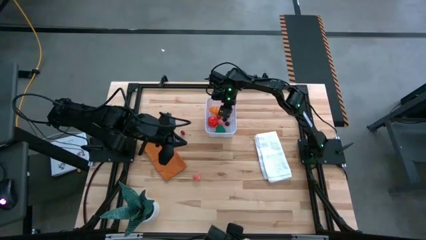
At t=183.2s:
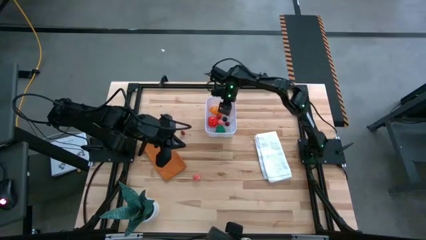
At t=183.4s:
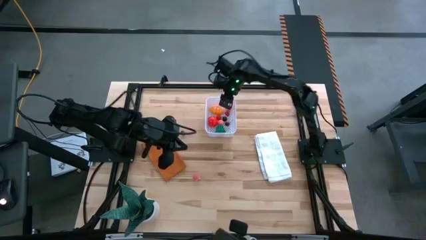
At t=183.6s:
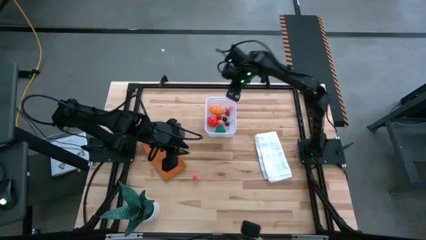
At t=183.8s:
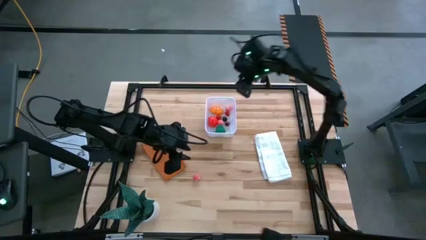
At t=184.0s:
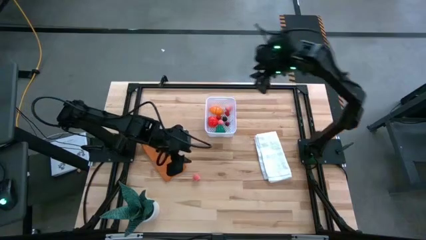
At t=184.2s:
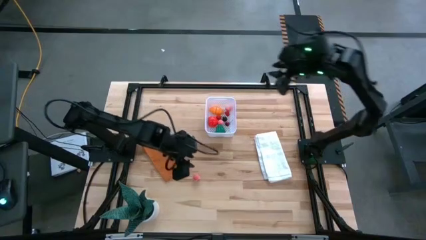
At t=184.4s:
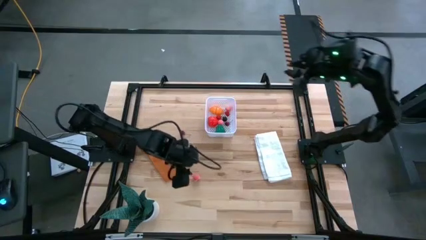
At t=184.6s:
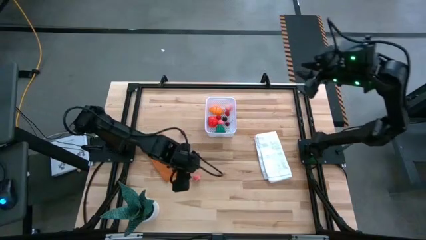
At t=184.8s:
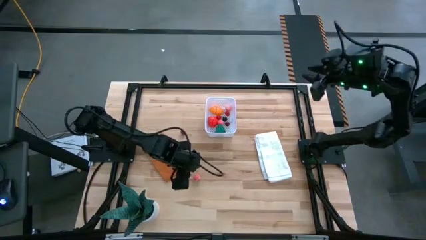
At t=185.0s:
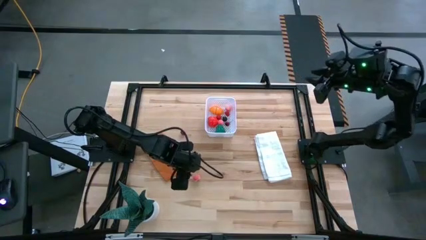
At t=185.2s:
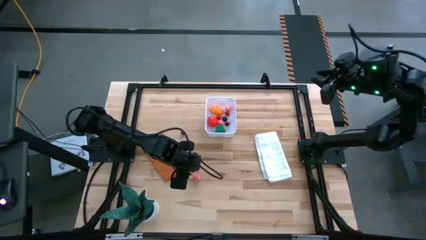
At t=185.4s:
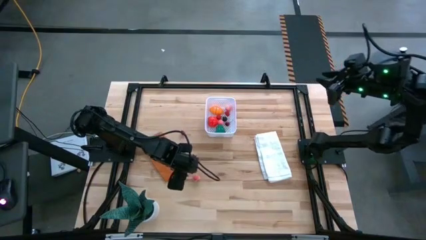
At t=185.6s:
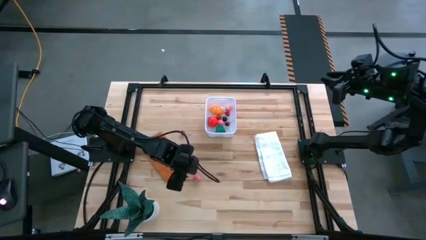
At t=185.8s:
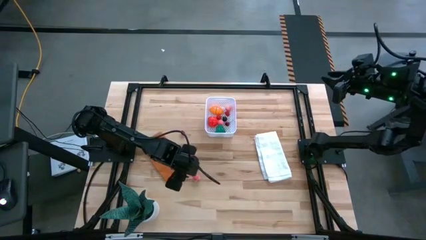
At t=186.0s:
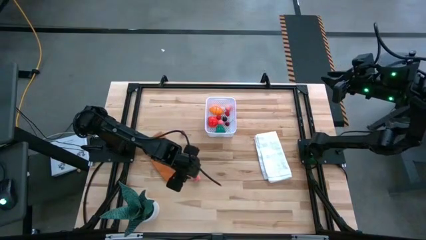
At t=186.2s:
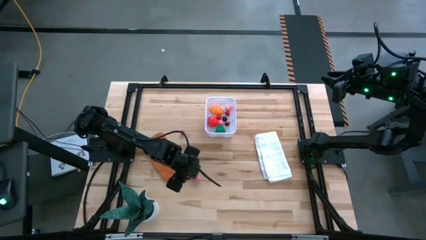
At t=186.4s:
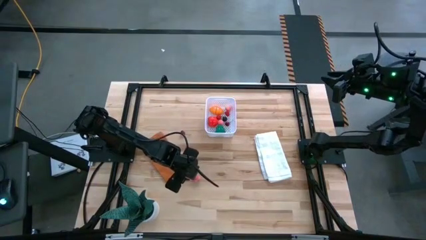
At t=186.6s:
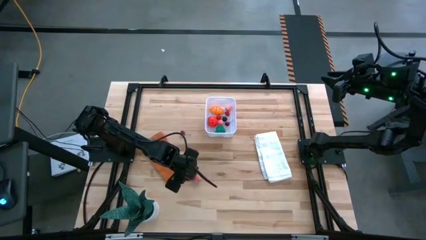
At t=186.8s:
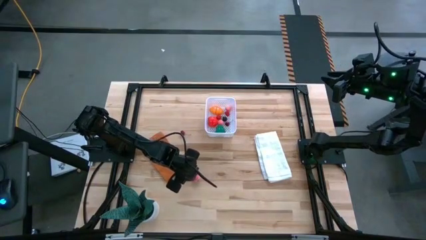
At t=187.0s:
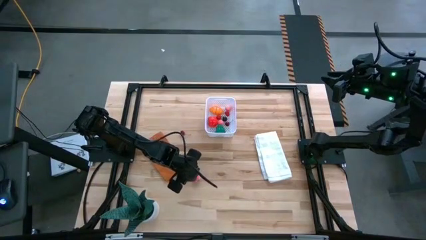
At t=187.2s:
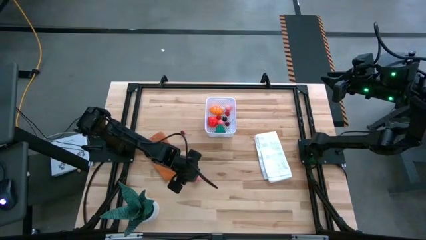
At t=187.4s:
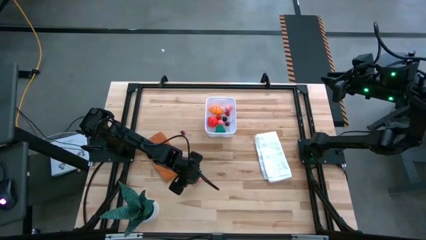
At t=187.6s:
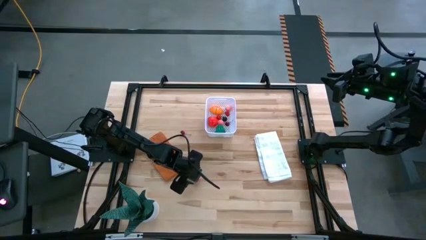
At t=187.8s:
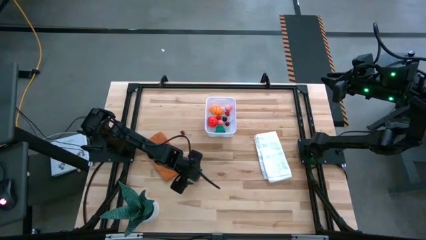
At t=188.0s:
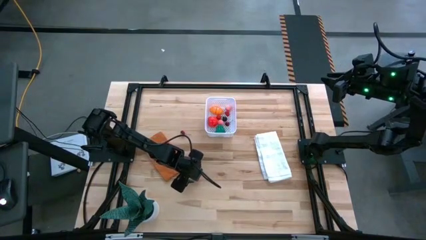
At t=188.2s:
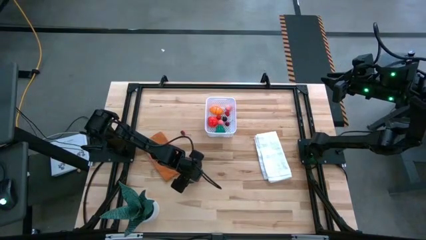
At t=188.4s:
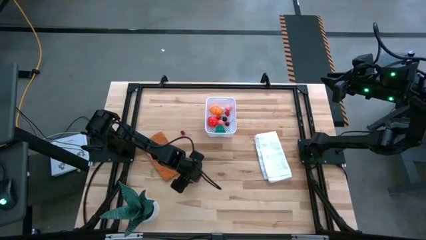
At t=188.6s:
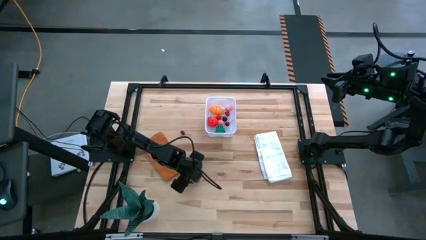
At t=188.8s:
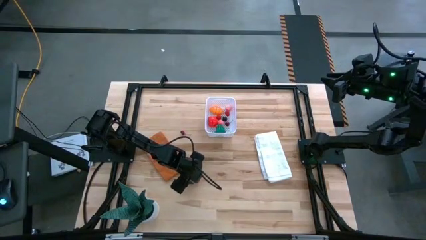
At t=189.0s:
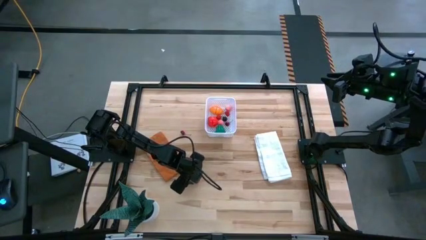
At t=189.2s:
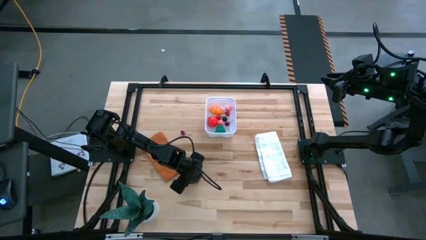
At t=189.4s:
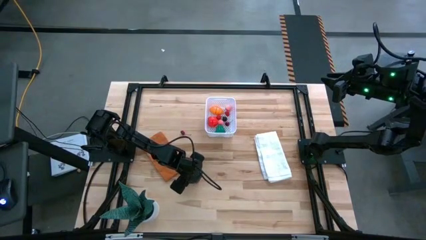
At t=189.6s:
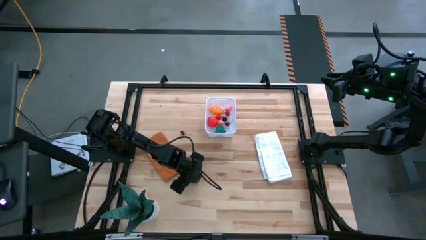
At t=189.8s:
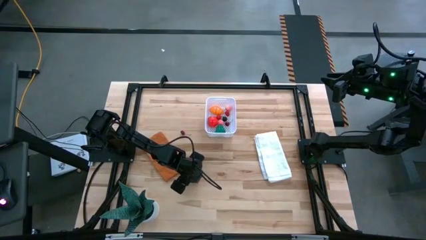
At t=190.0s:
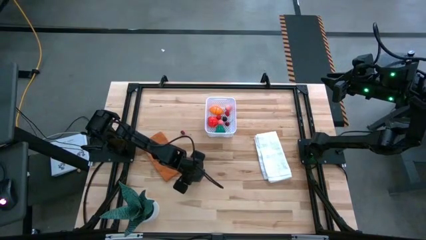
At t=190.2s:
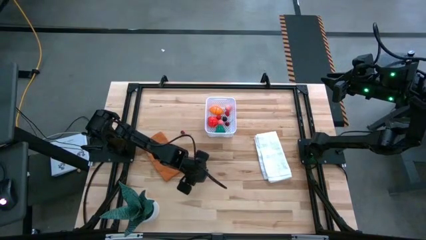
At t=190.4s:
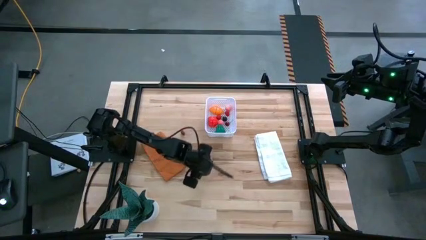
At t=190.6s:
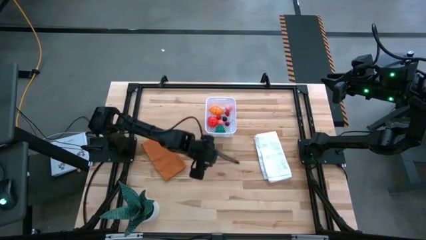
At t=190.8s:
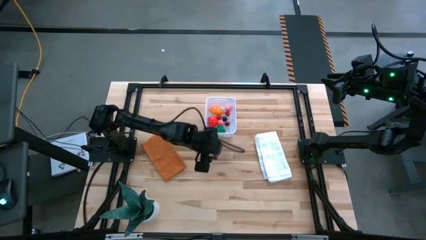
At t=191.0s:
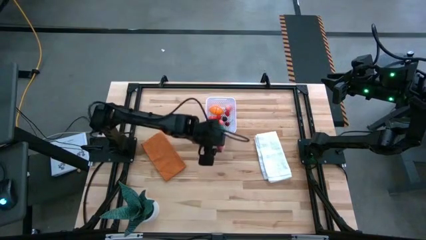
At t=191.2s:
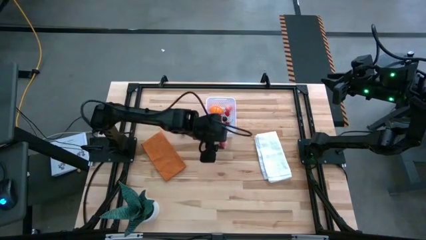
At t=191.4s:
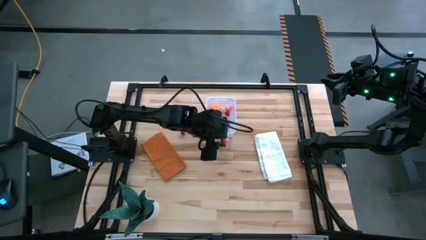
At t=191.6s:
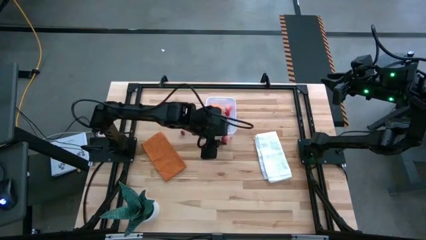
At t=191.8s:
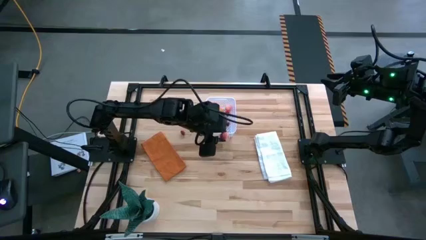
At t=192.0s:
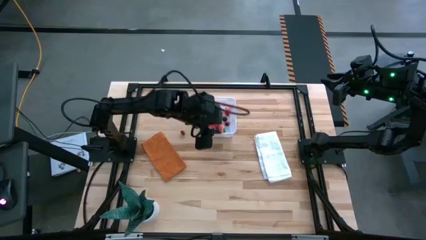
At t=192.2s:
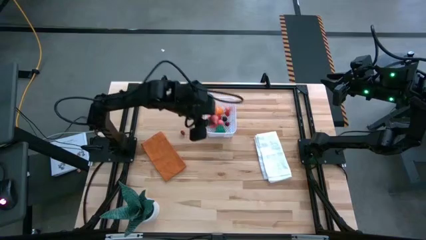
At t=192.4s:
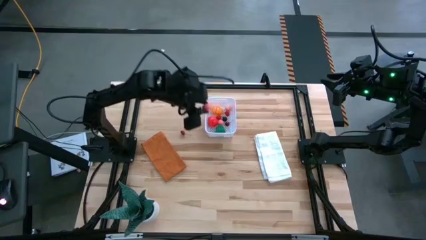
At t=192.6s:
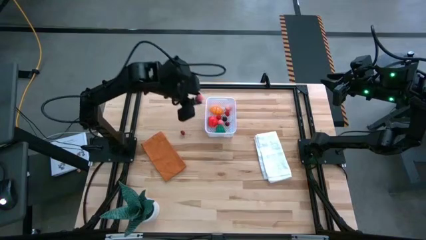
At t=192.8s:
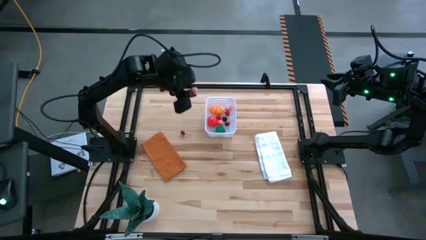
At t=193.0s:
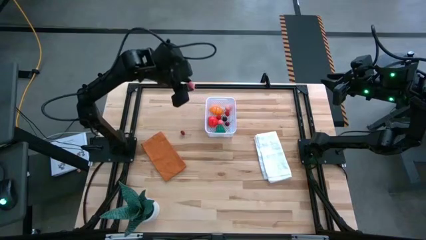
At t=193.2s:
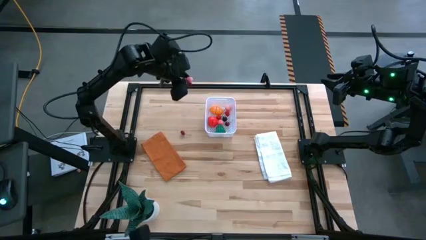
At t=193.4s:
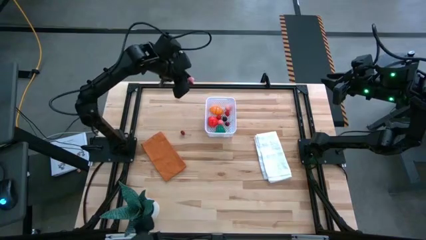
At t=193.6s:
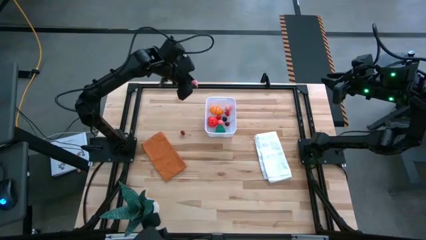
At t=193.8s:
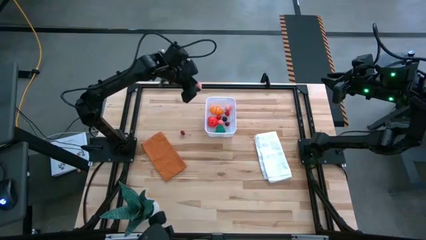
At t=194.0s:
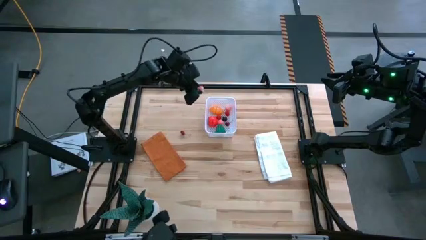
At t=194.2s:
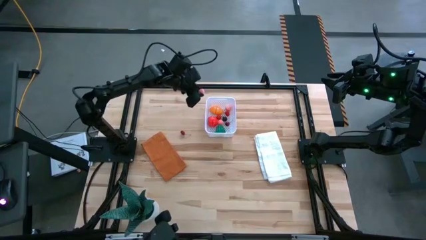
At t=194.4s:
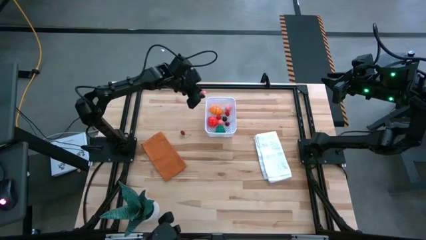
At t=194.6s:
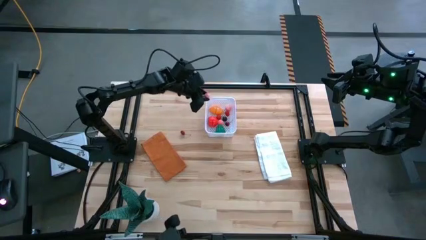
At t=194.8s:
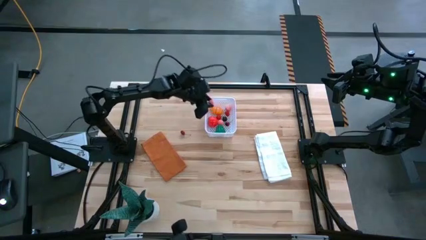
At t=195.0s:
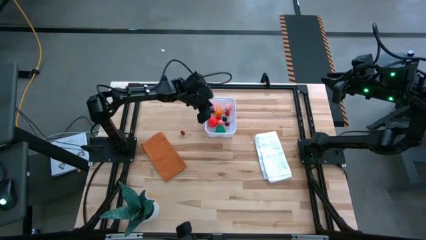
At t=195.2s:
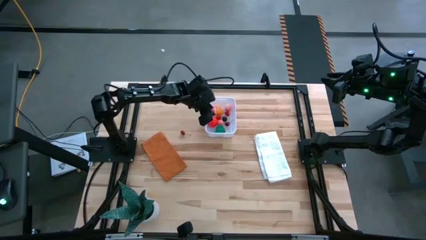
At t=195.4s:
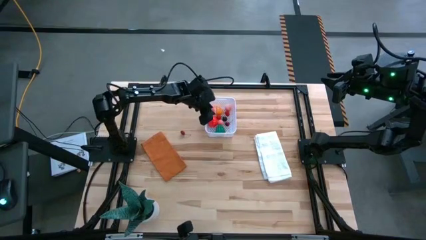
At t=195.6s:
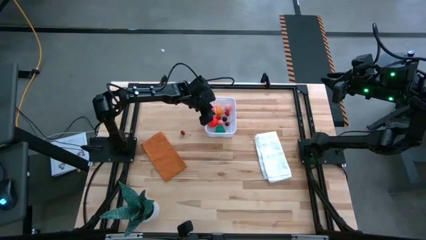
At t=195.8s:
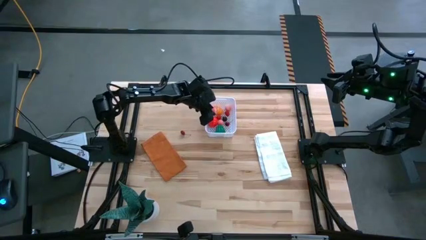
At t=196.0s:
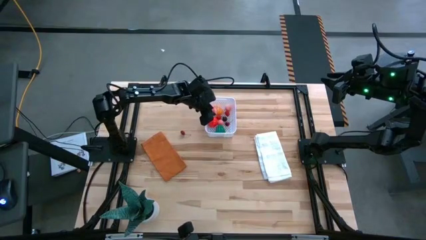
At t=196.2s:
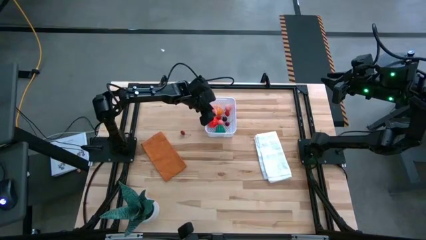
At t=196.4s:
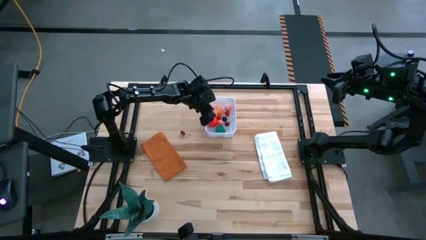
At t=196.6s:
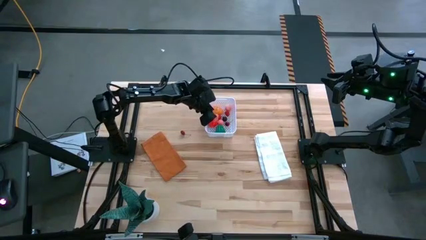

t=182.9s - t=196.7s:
Task: Pick and placing Produce into tupperware
Put the pink peach into the white bin

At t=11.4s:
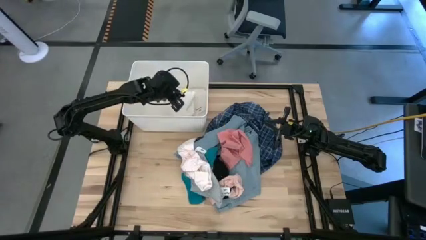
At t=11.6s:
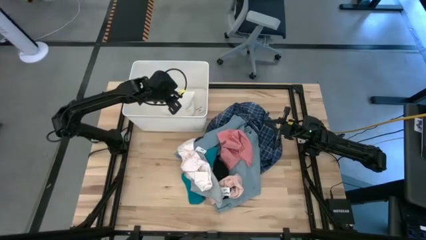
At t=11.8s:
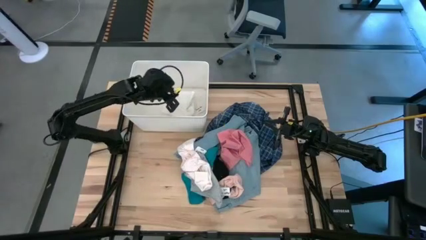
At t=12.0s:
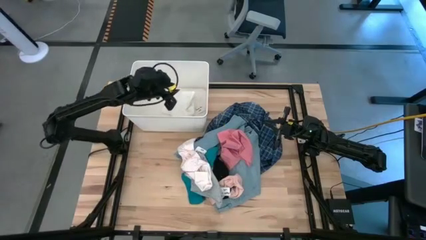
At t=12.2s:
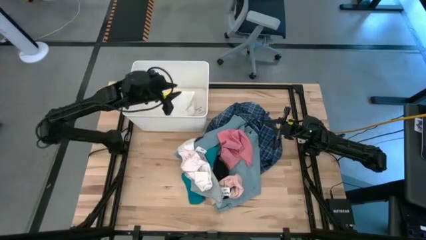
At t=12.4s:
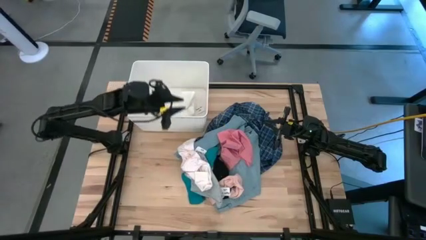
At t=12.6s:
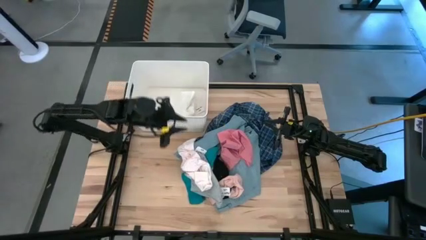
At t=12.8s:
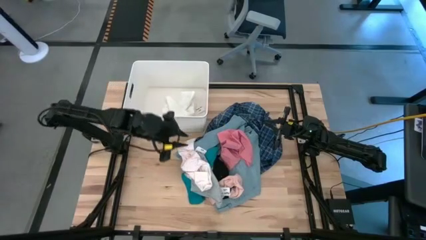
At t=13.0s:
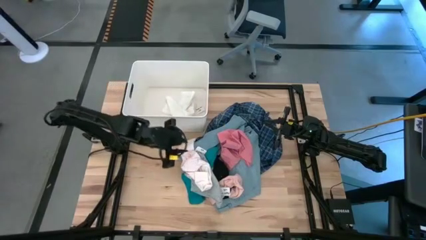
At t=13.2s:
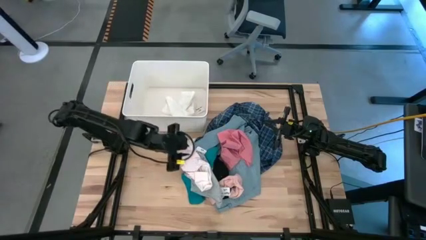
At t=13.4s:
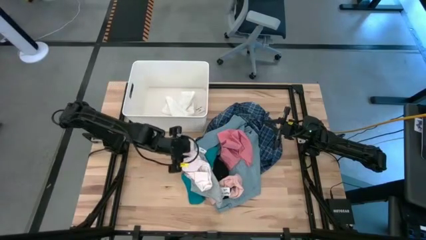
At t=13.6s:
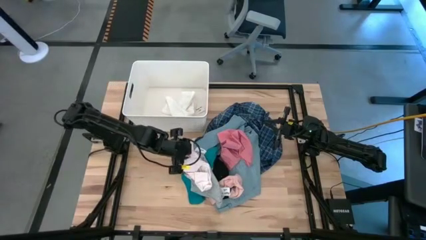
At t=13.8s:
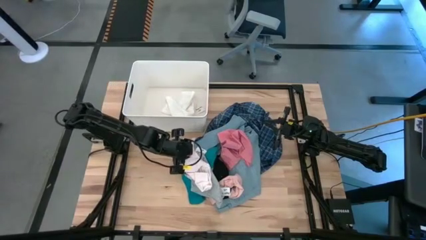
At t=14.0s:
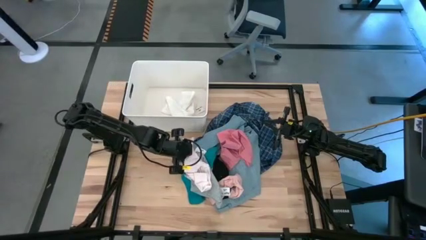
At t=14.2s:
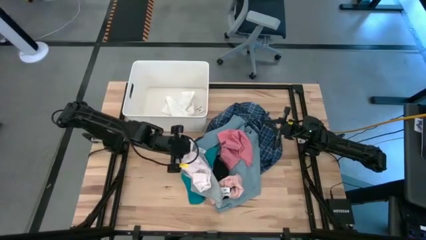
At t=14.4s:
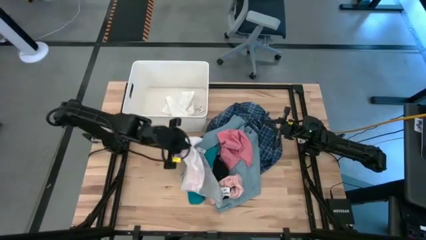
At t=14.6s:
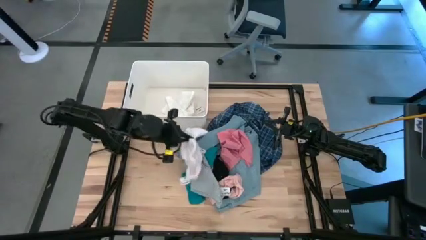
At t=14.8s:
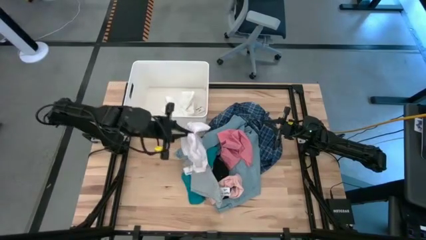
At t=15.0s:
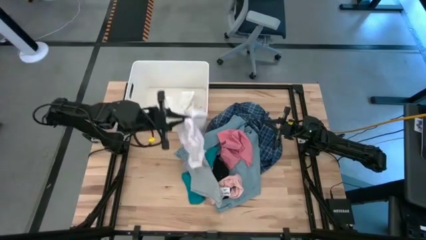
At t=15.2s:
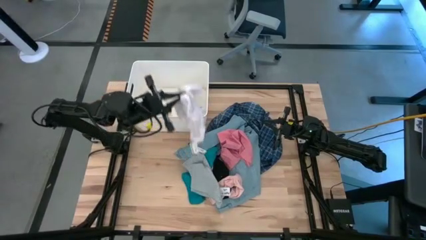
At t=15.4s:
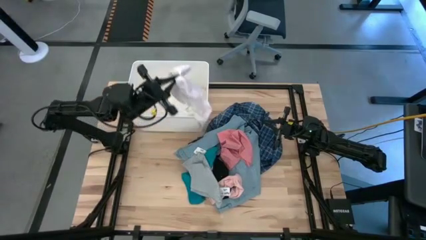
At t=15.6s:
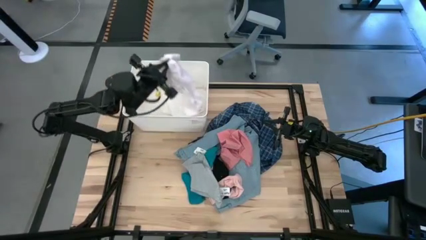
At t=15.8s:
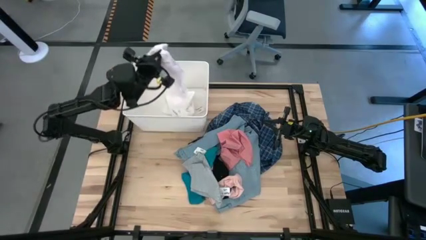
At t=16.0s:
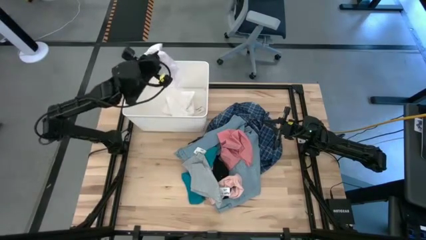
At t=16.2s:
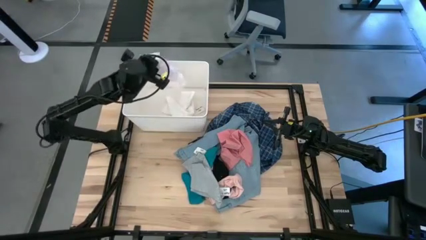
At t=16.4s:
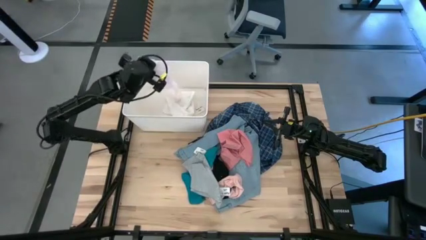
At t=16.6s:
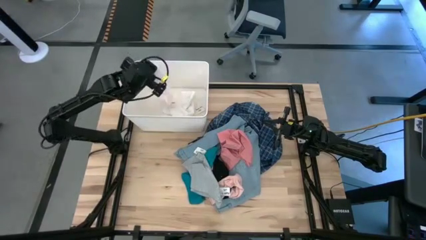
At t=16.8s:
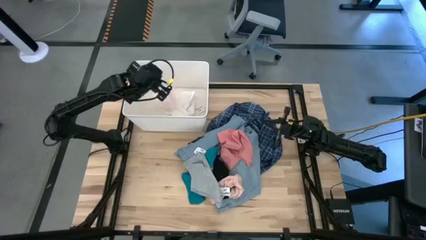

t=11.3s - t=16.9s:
Task: Sort clothes
Put the light pink underwear into the white laundry bin
